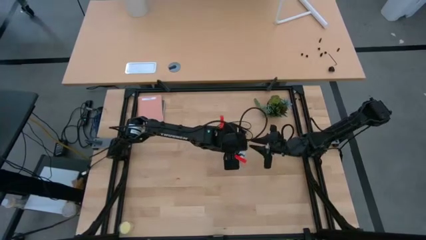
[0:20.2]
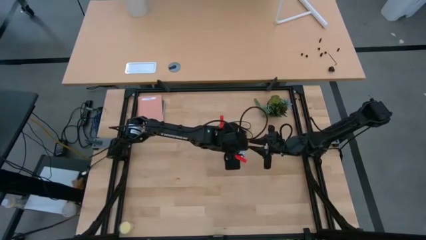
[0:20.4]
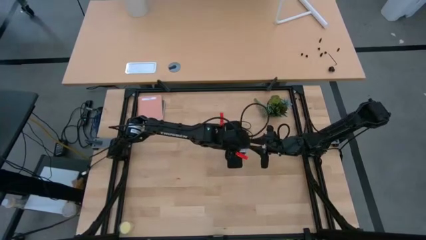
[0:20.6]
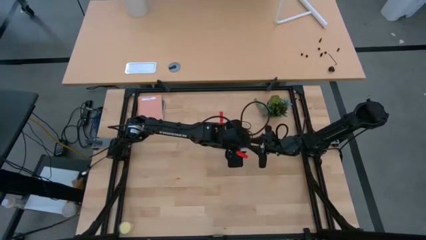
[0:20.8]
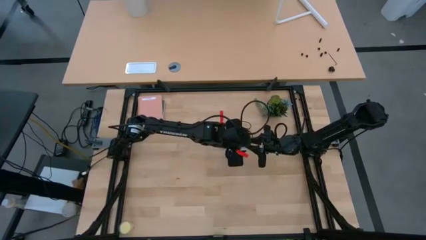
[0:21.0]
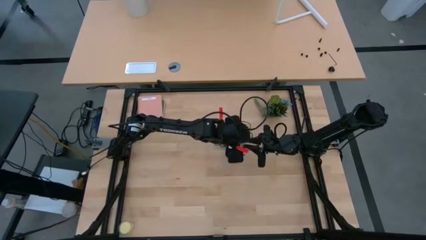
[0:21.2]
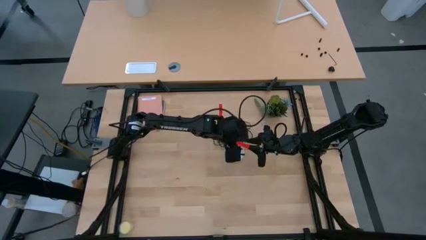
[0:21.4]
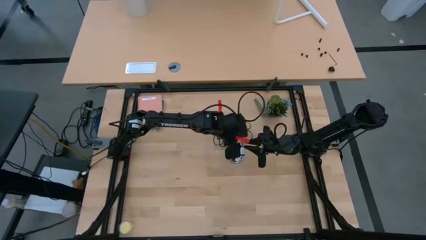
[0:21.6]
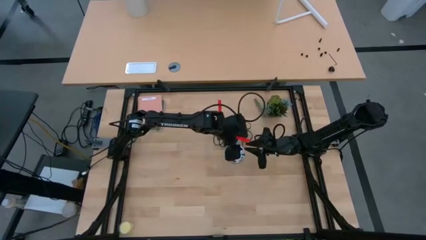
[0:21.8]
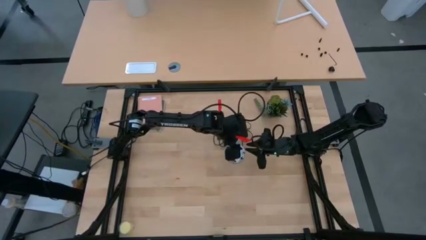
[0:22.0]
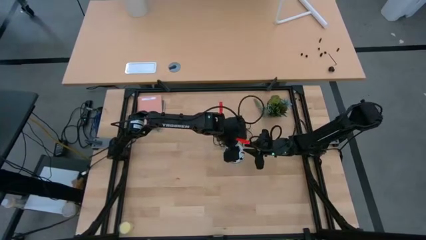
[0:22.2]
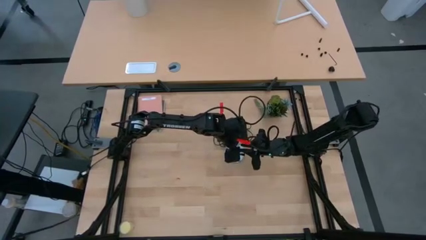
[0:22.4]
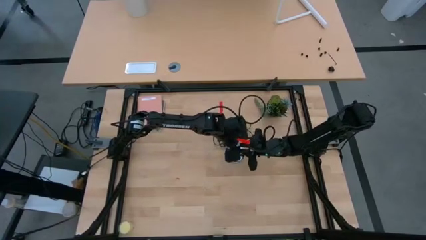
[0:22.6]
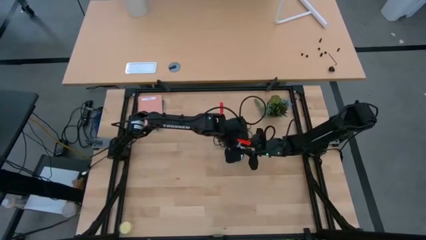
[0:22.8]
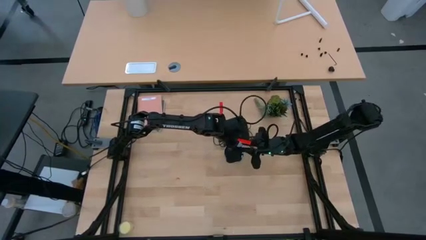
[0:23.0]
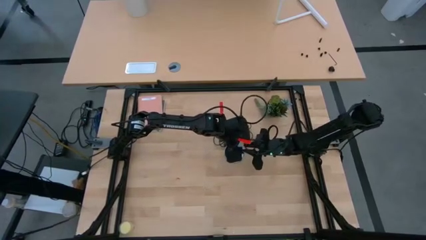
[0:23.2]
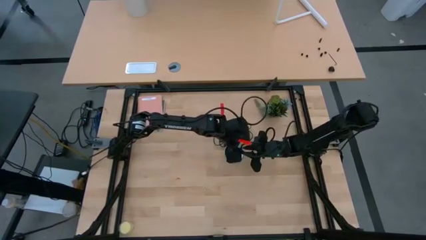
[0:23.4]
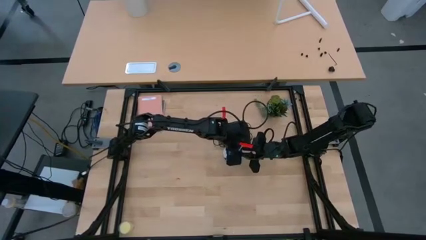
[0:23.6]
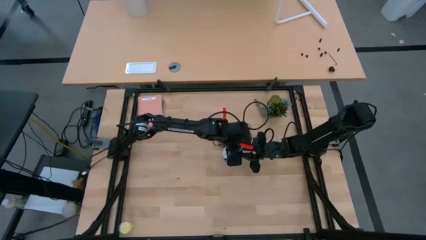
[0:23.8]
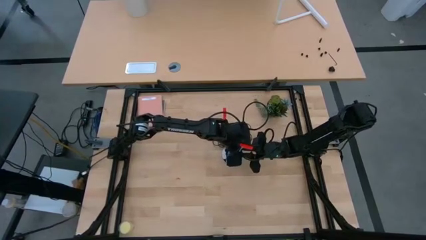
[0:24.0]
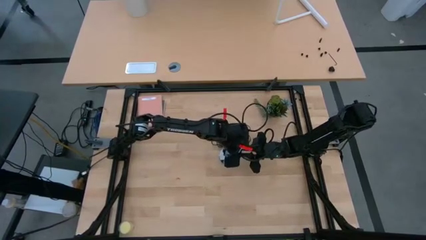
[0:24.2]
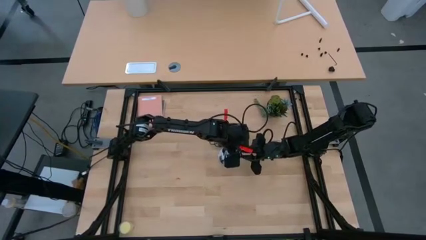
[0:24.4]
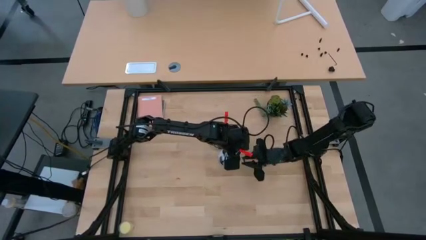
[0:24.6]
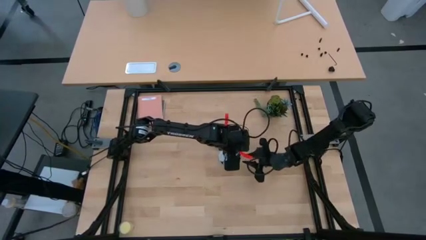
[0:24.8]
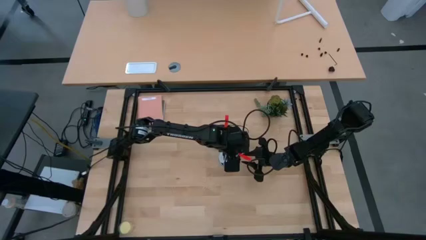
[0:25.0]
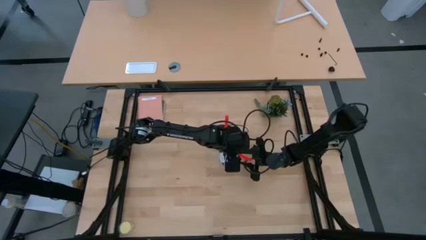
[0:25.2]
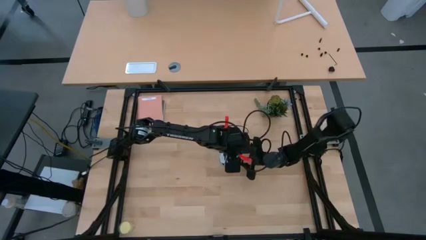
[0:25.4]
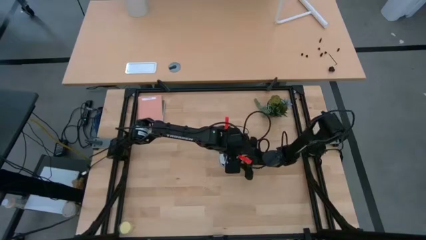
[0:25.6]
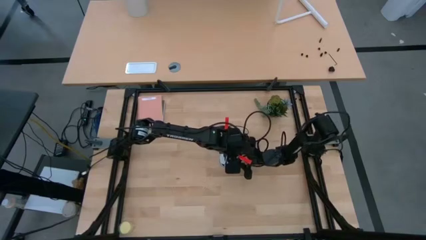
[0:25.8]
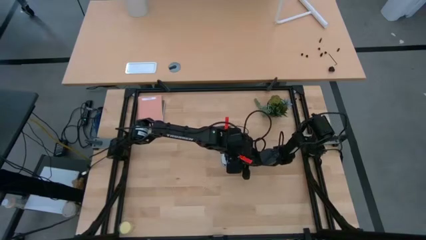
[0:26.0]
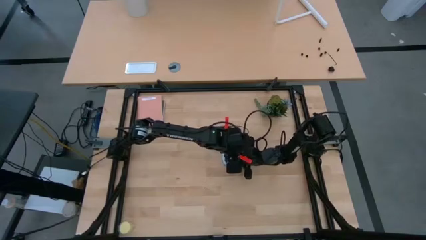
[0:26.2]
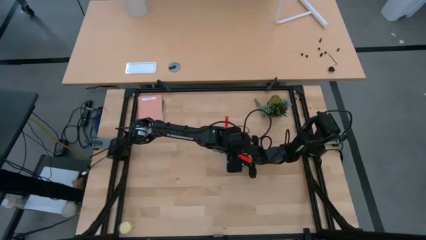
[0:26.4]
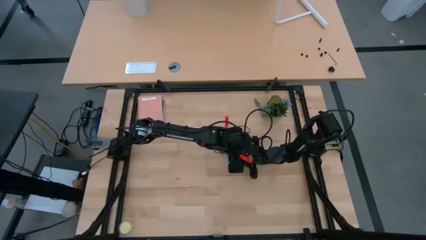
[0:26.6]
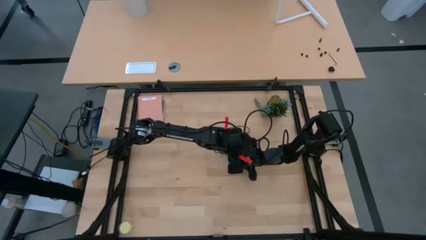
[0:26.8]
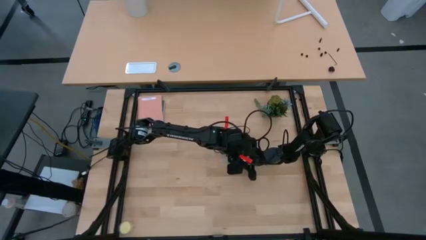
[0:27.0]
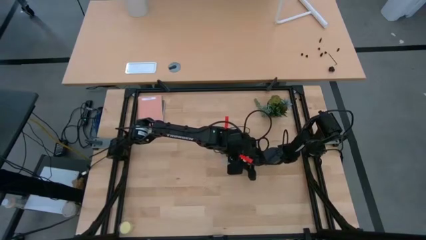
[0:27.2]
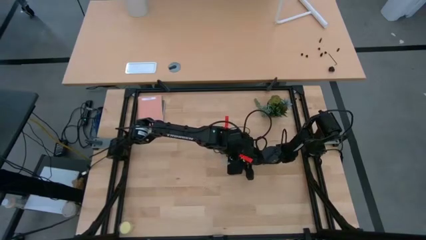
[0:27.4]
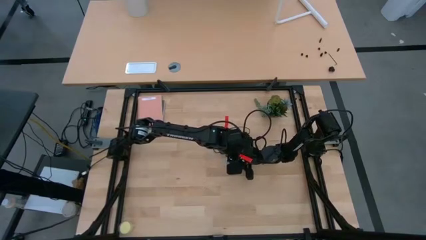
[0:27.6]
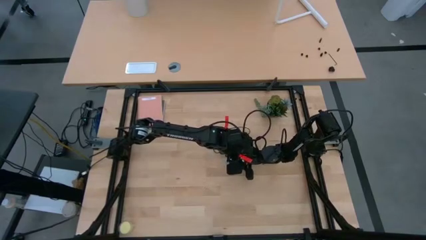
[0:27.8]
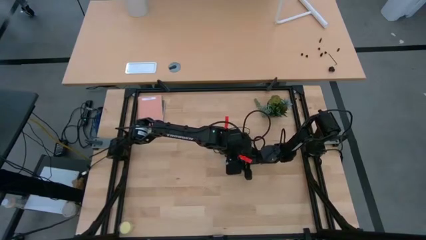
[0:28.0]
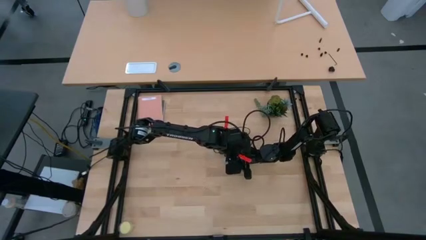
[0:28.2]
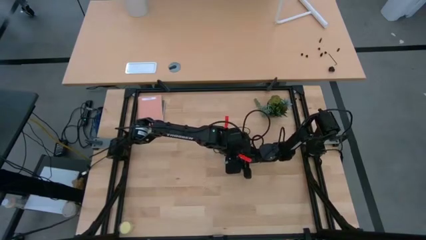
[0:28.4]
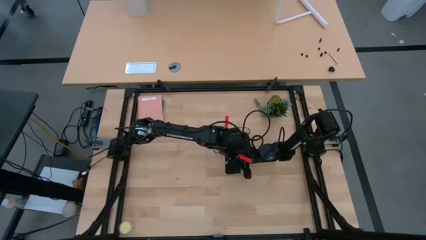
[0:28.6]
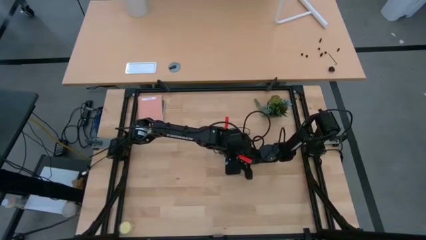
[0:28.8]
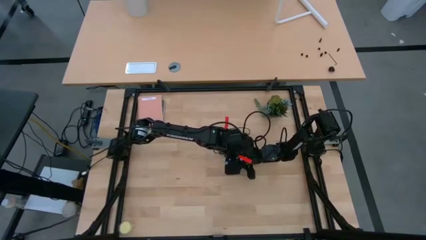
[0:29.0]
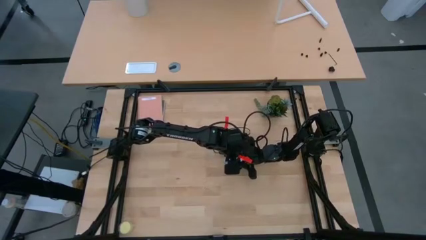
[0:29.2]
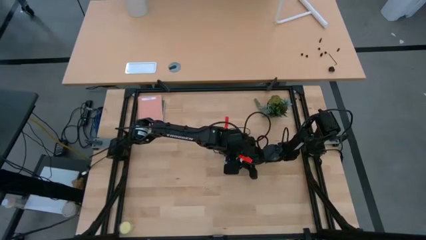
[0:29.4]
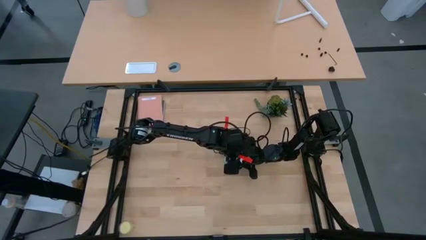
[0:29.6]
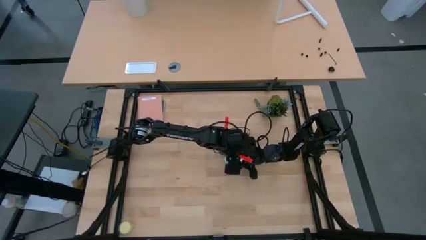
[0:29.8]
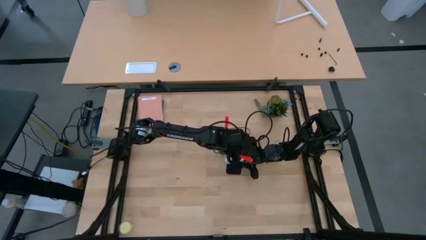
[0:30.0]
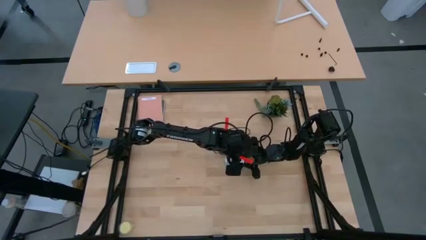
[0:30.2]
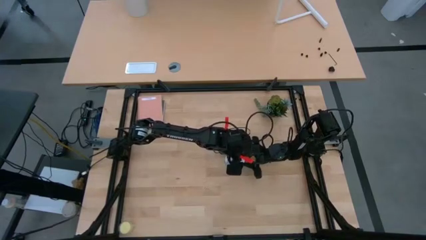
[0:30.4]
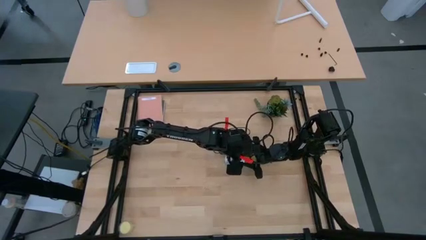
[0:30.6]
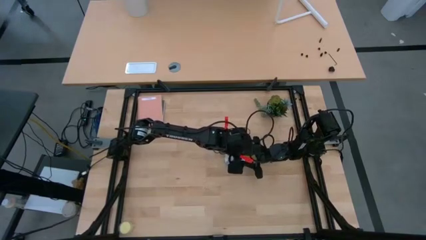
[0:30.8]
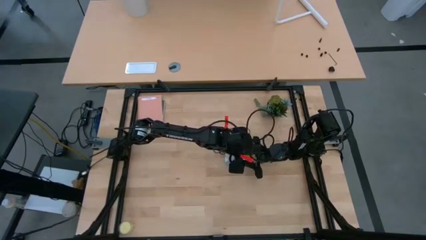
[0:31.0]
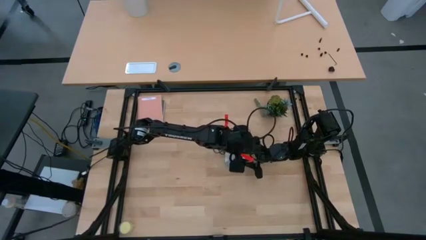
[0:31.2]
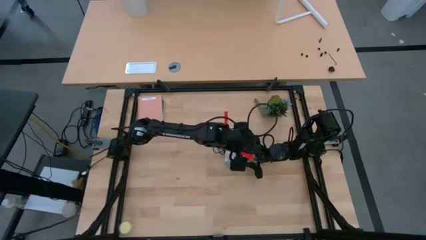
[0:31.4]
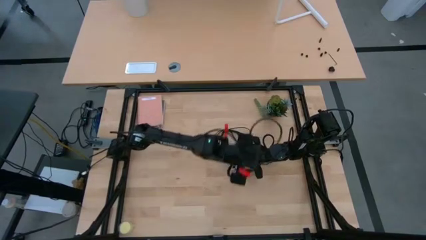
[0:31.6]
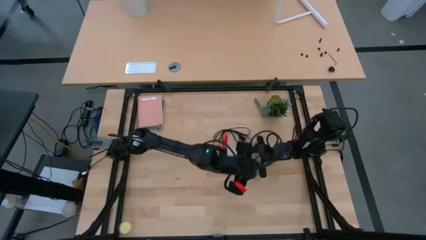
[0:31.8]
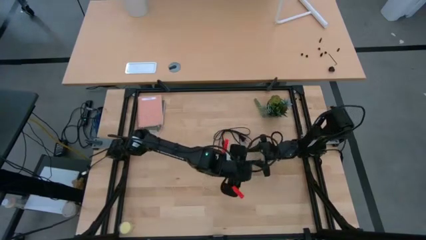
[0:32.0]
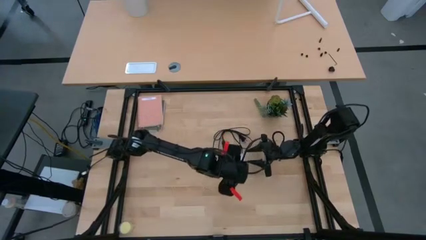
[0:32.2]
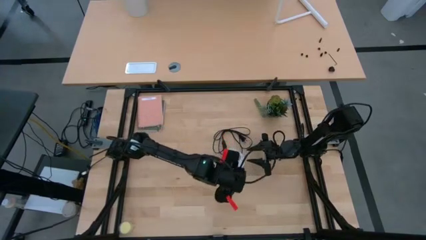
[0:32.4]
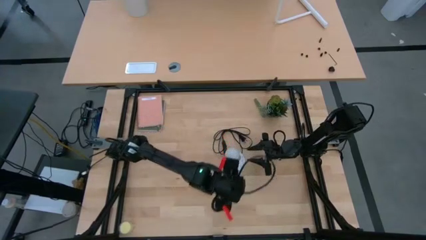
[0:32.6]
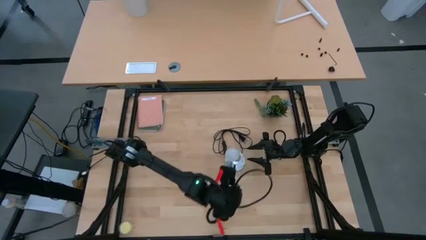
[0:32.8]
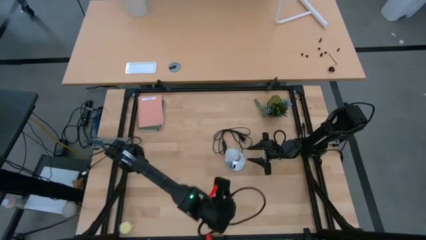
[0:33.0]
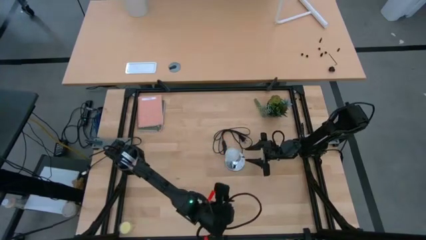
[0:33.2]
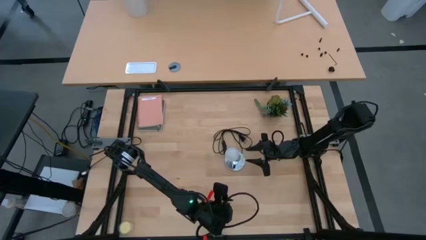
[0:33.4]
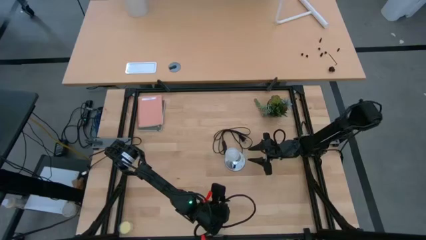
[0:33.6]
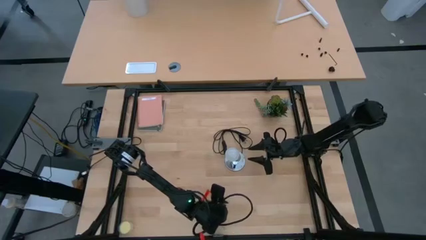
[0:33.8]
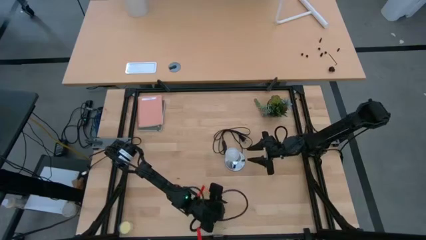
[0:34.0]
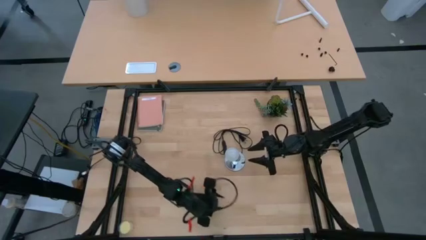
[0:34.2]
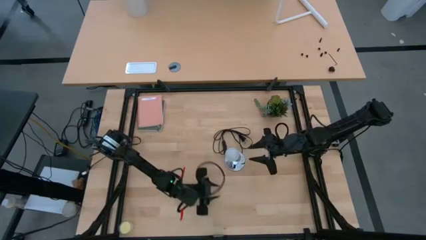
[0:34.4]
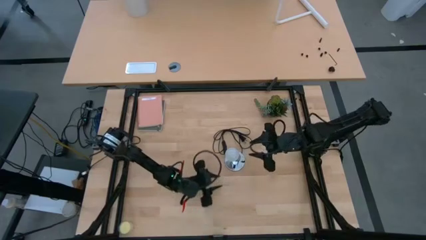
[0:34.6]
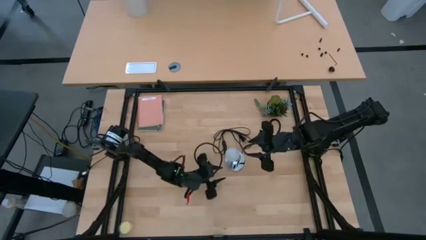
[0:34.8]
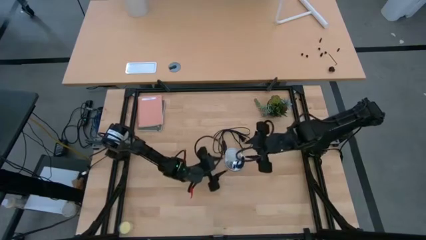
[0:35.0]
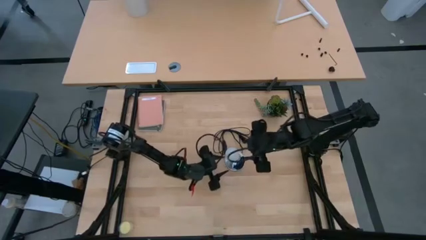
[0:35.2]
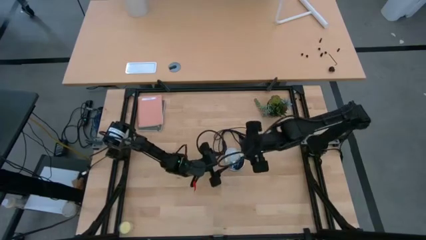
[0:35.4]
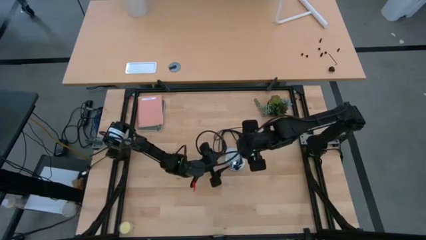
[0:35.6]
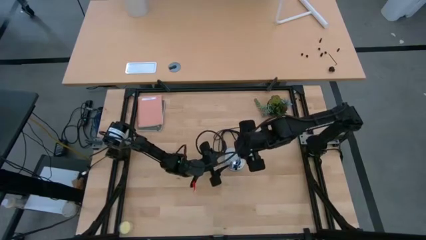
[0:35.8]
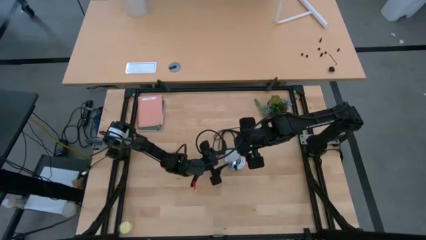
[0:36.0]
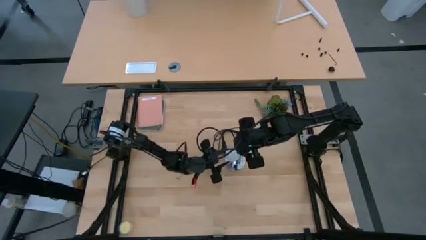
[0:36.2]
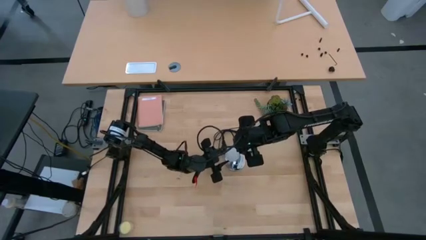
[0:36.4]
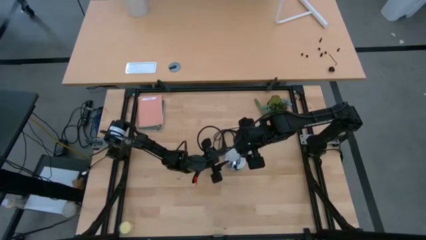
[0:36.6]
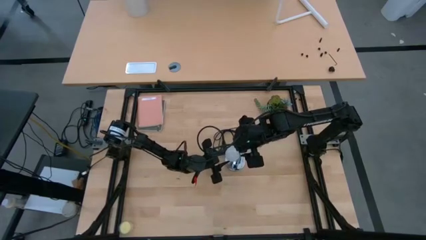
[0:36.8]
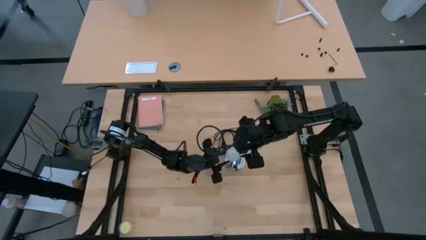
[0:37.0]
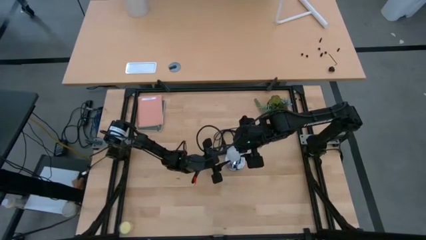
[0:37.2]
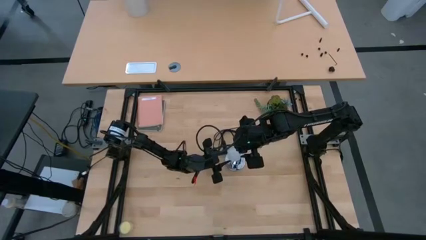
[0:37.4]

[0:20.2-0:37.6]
Task: Screw lightbulb
Insert the white lightbulb into the silver lamp
